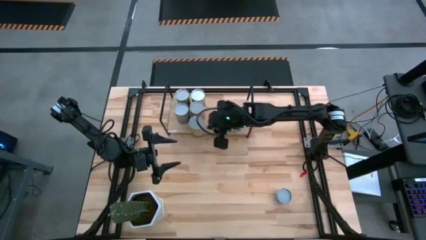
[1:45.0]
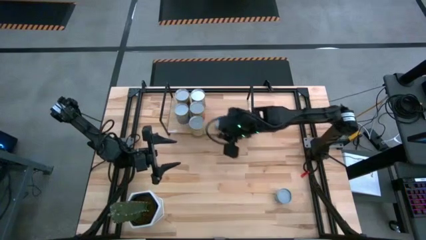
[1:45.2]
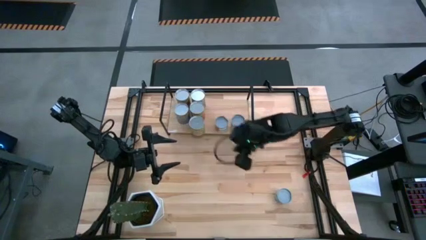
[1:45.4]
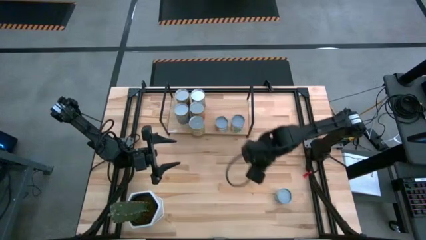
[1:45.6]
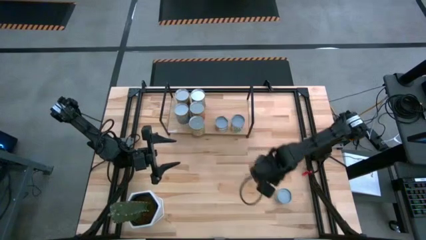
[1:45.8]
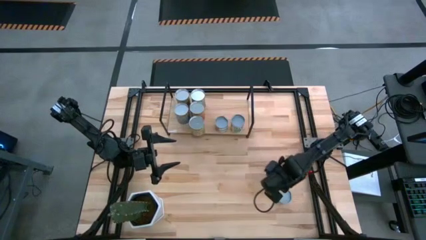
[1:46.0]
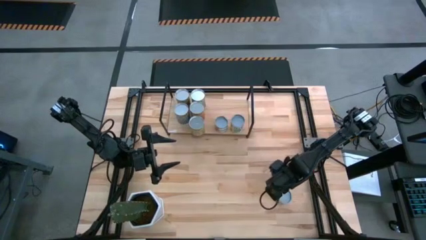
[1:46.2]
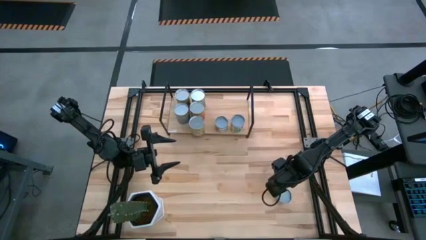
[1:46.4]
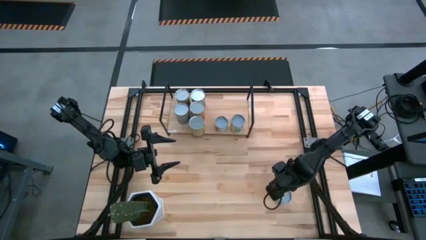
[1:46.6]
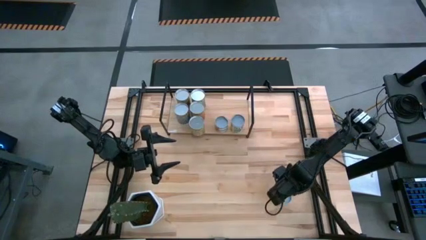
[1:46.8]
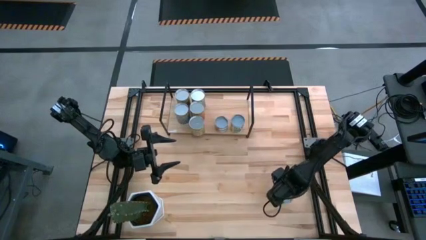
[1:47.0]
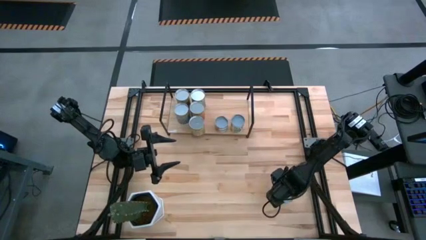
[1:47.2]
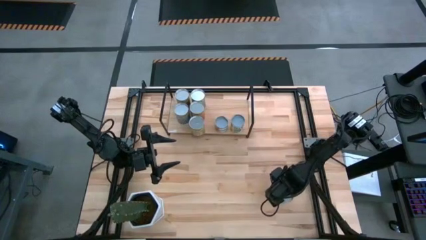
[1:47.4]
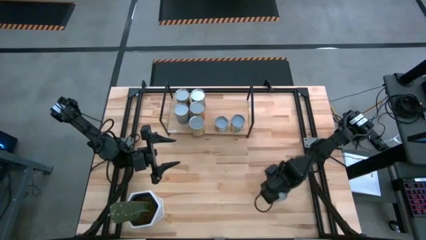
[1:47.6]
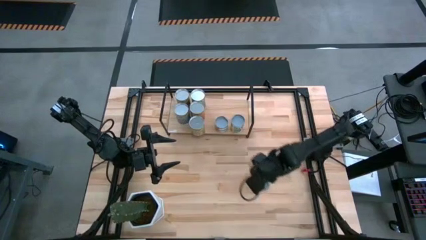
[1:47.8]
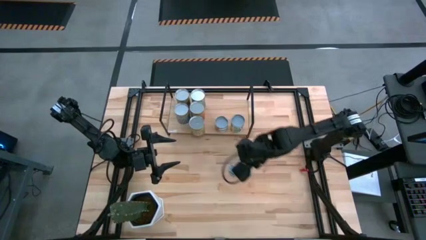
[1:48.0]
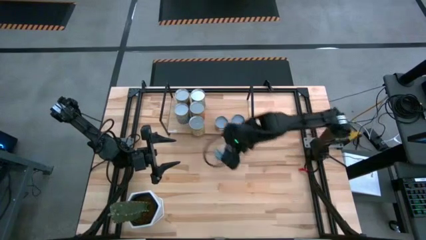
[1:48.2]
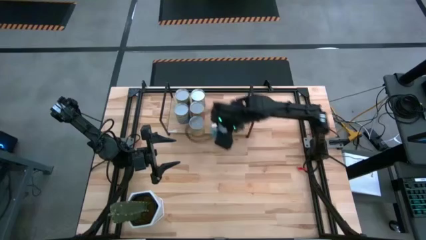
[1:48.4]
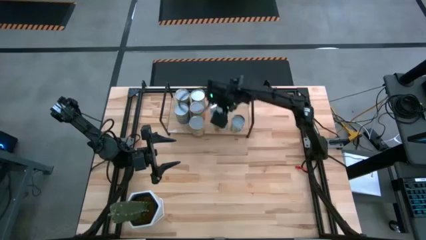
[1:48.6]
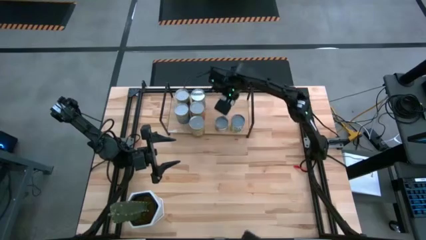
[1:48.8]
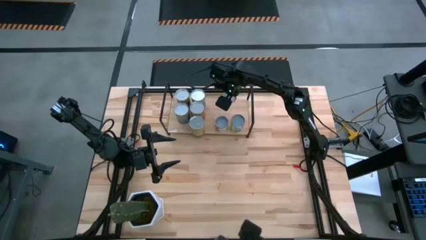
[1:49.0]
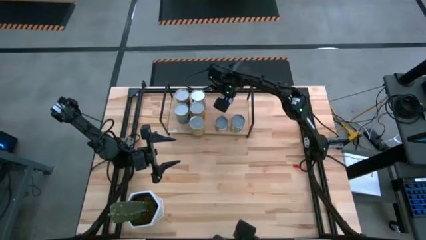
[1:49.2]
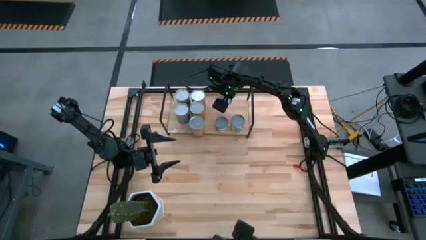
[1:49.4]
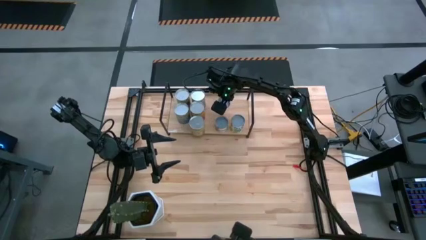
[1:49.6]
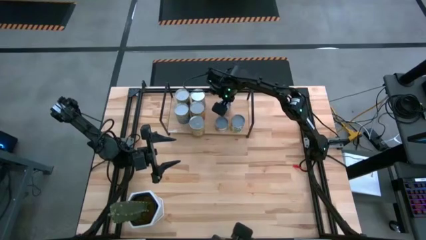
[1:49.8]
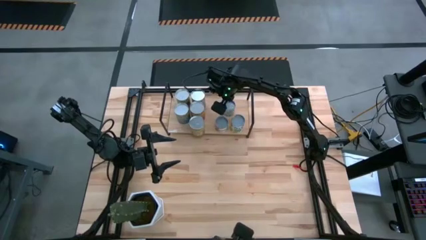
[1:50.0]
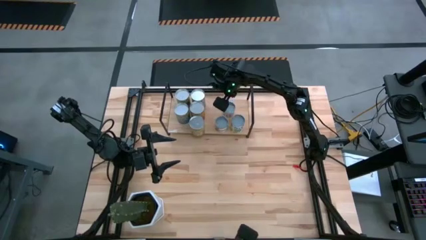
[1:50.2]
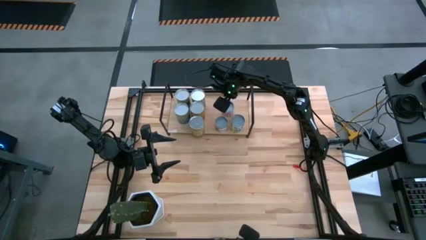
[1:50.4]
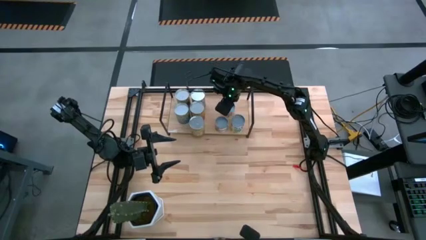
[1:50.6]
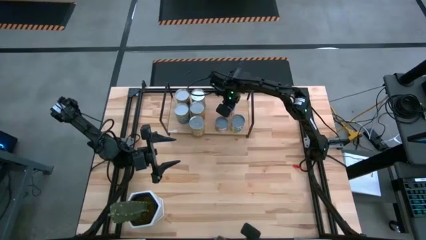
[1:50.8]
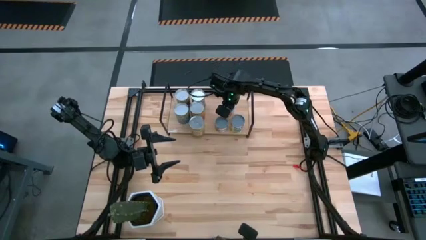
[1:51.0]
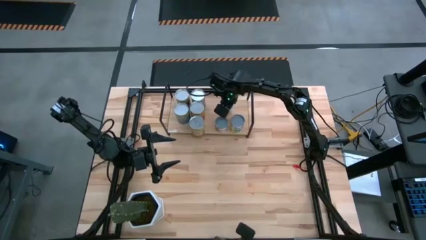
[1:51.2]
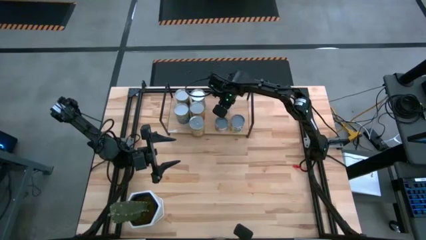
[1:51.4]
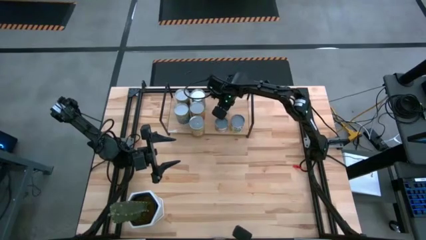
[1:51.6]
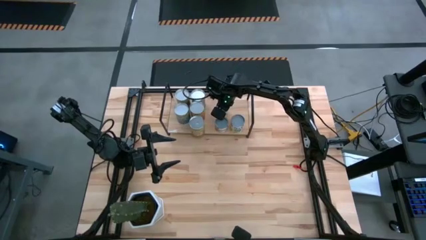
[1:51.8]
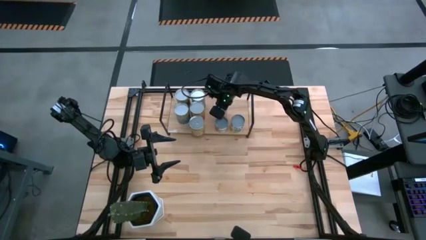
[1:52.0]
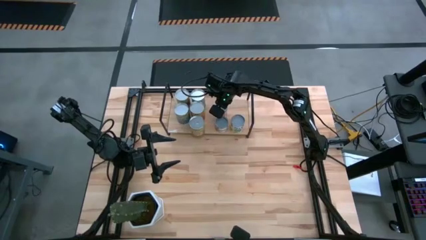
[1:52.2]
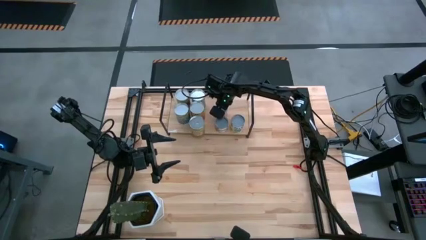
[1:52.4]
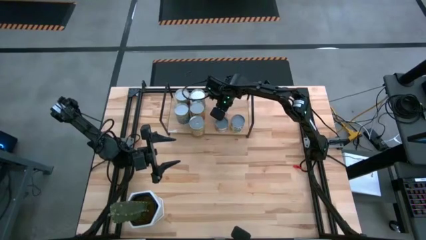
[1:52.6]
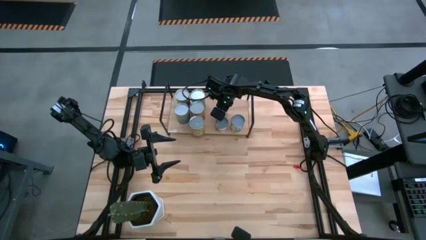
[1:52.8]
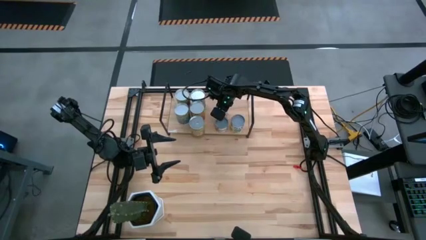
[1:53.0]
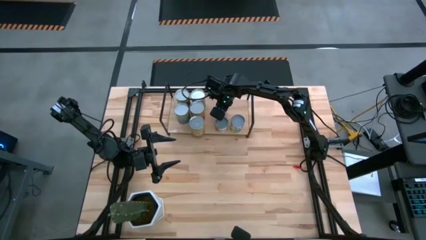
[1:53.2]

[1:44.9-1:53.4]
Task: Pick and place cans onto a shelf
Put the canned carrots on the shelf

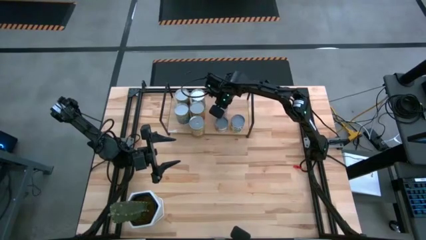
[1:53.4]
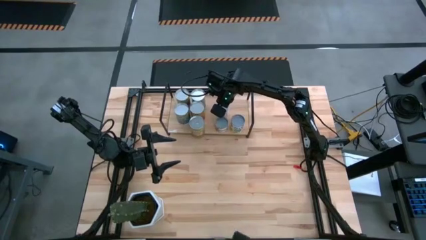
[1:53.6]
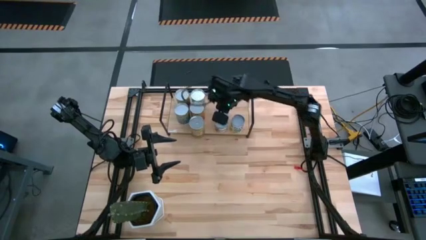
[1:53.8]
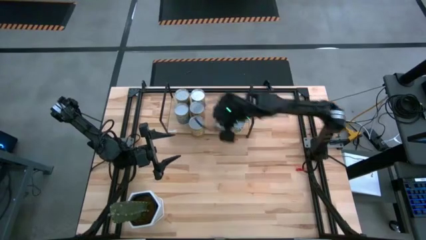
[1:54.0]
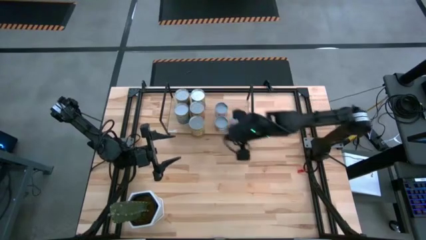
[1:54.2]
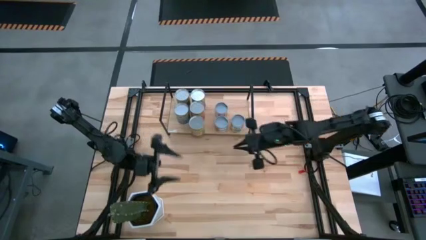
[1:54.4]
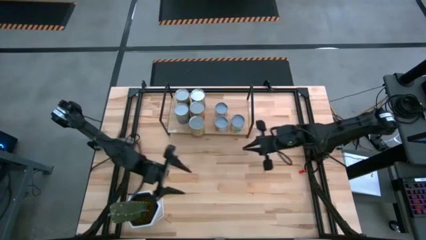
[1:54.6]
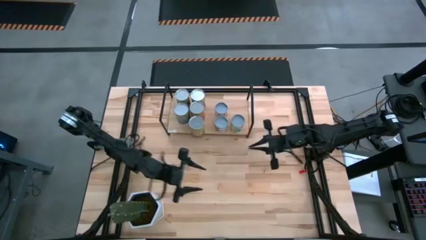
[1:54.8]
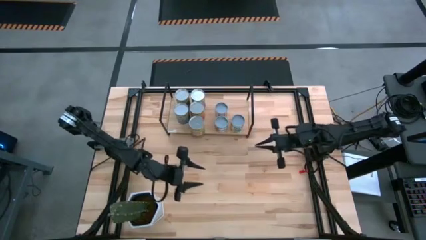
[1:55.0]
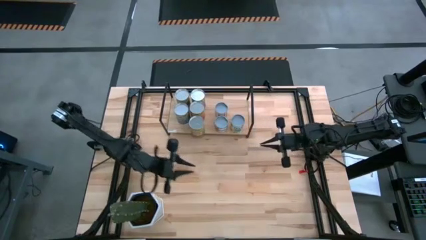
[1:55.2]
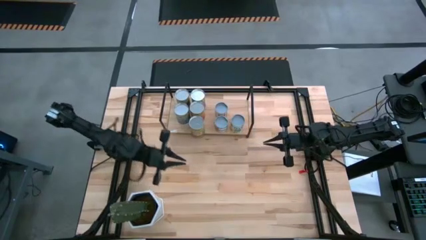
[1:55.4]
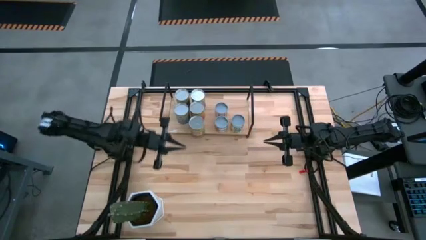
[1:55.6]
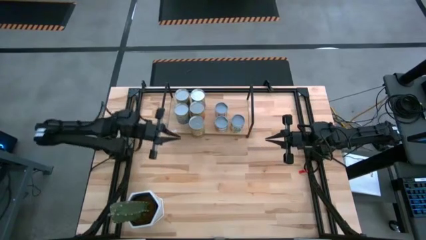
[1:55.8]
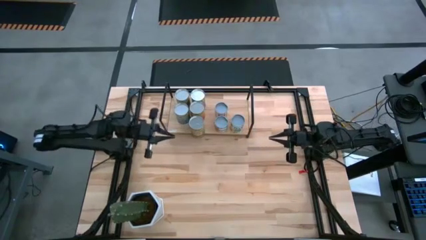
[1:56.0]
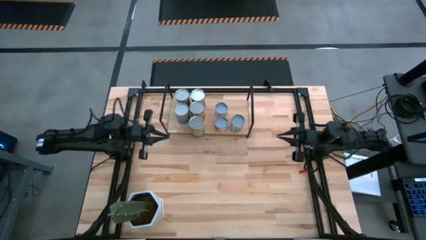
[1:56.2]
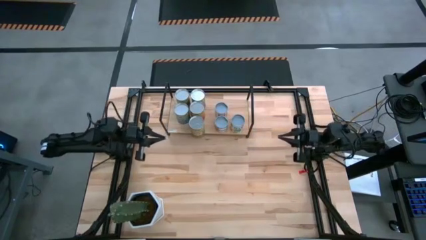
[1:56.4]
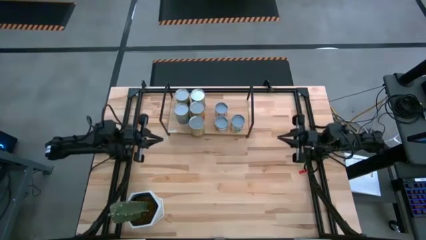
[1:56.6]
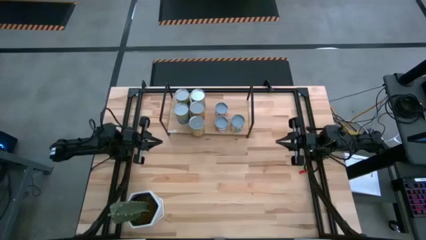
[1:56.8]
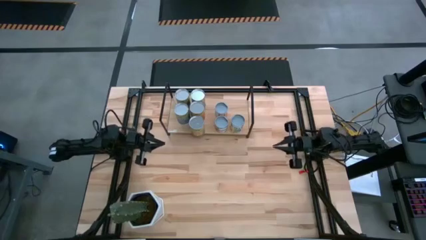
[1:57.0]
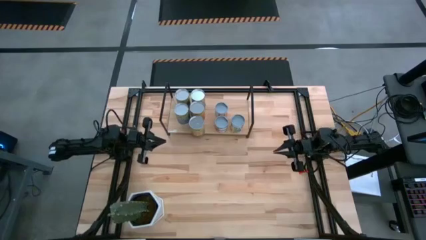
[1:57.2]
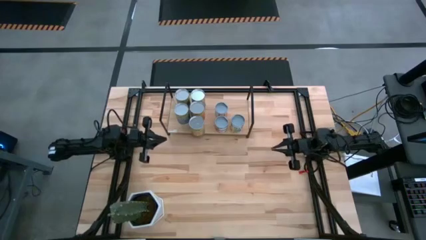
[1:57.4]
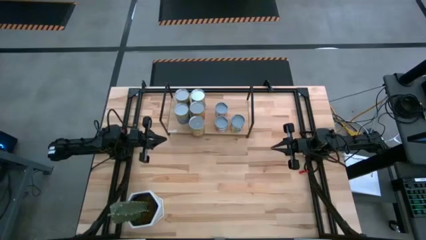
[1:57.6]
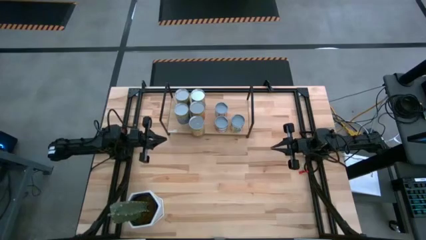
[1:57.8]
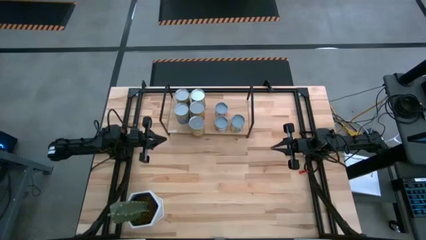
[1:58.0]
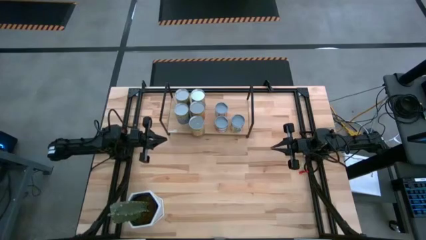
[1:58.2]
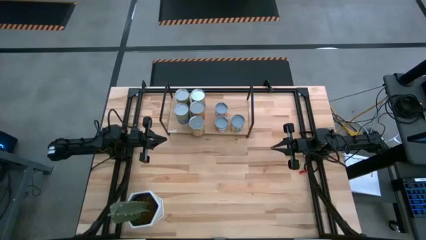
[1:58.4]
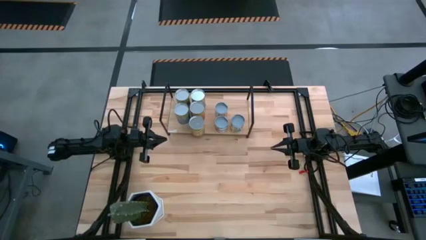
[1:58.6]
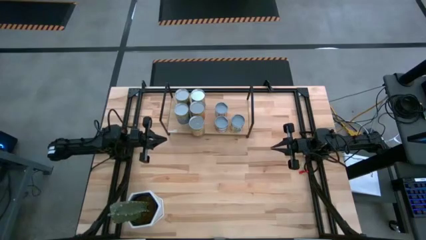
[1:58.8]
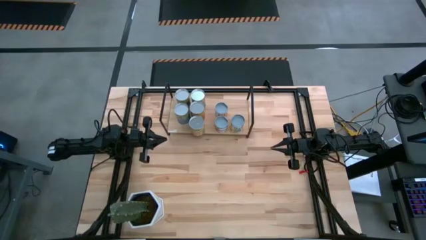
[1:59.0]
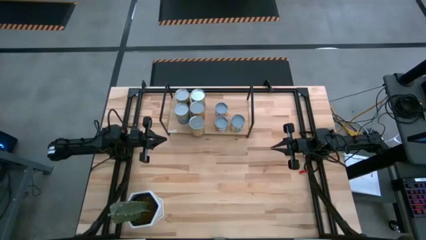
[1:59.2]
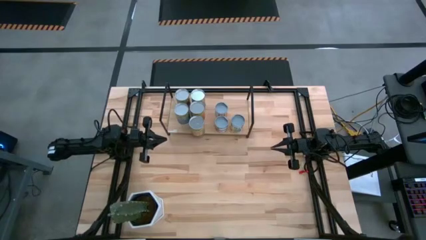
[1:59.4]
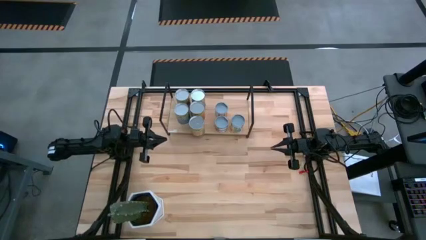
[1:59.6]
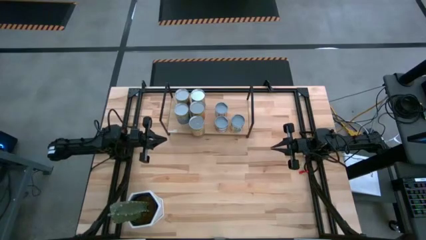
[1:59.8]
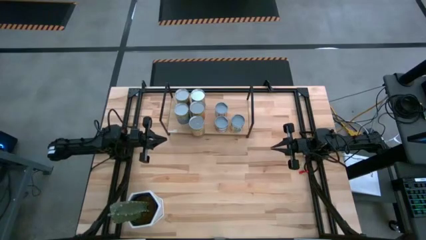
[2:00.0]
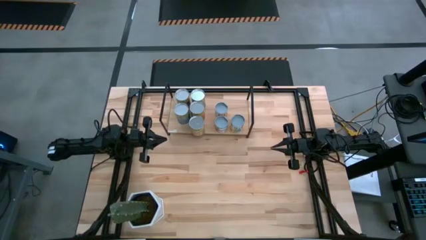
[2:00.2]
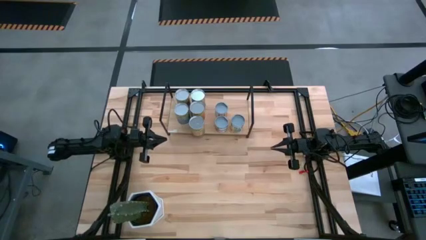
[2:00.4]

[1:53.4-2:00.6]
Return to Home Position
